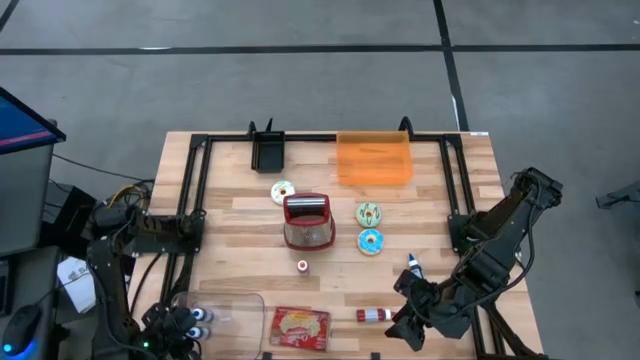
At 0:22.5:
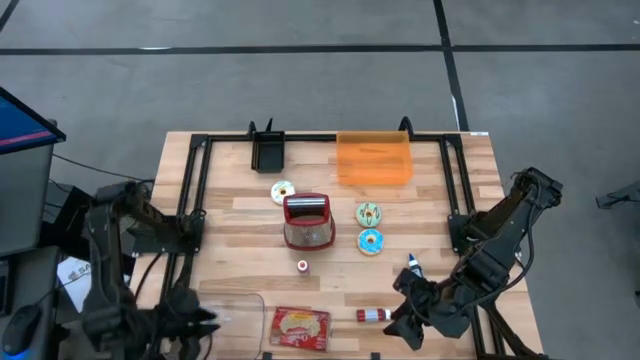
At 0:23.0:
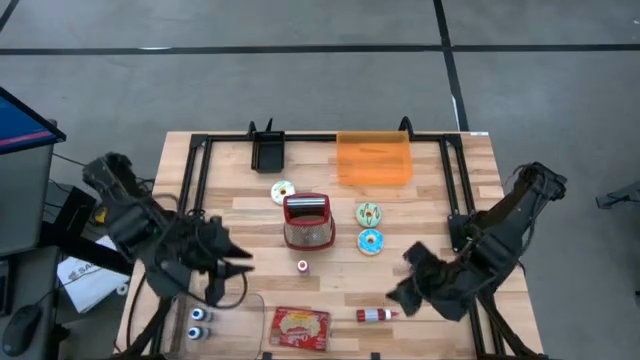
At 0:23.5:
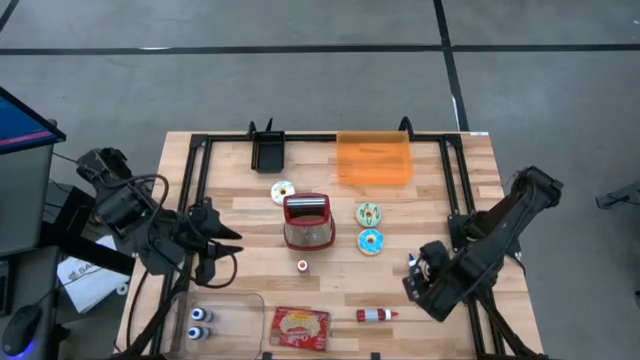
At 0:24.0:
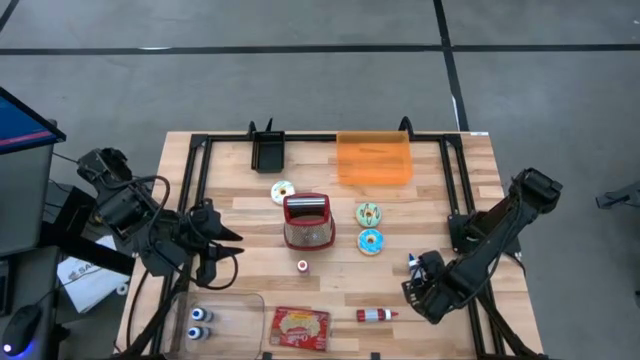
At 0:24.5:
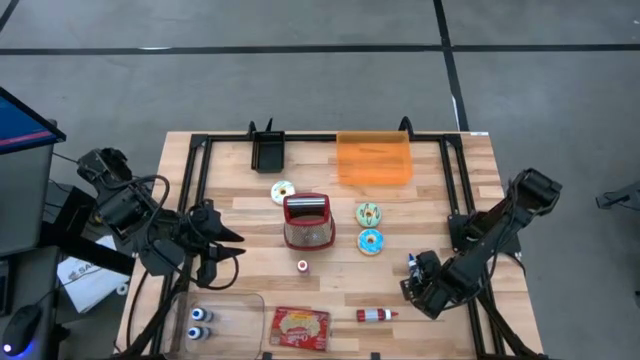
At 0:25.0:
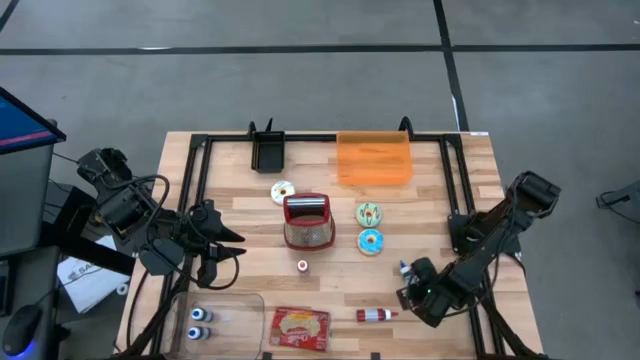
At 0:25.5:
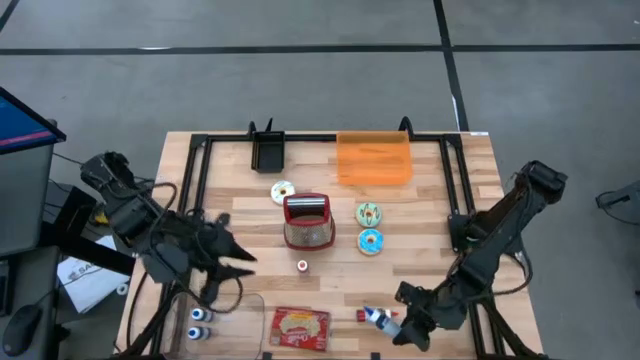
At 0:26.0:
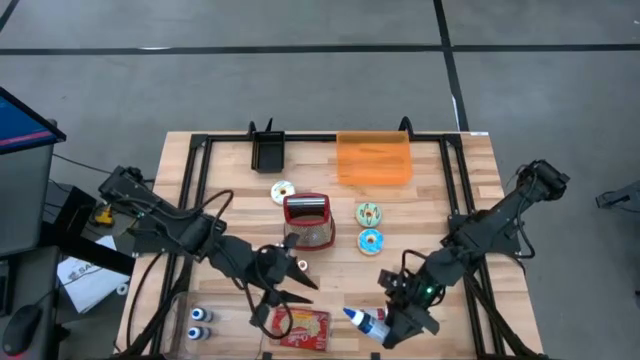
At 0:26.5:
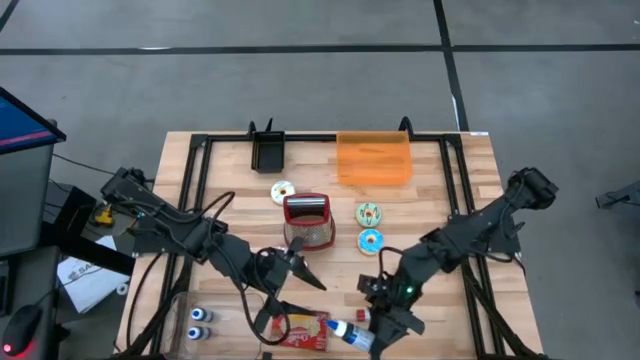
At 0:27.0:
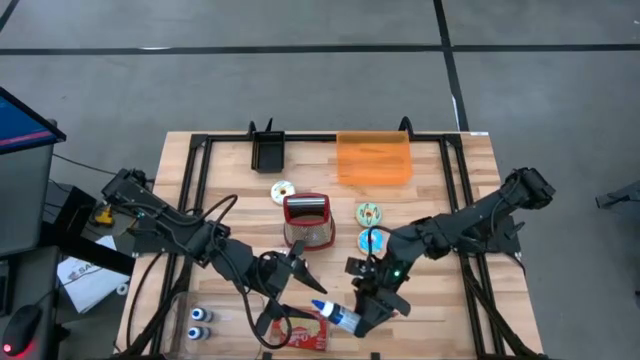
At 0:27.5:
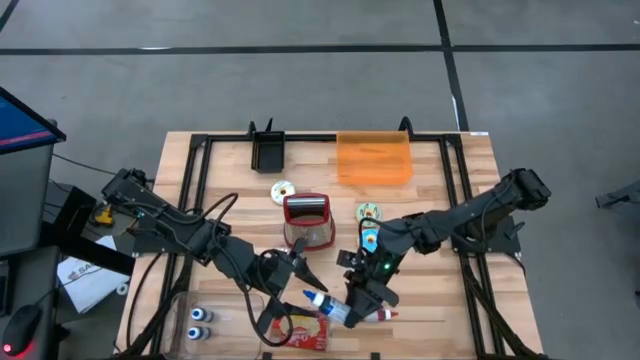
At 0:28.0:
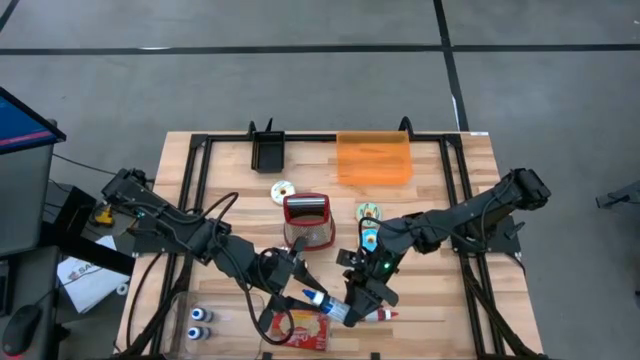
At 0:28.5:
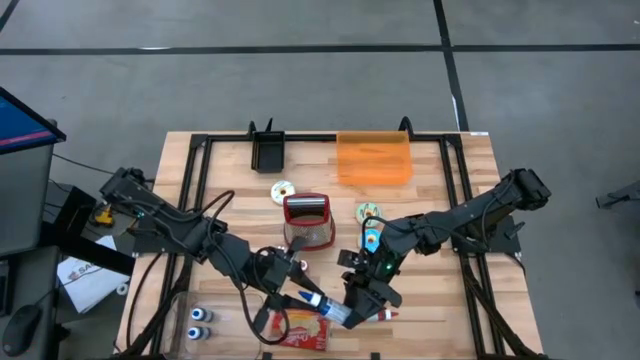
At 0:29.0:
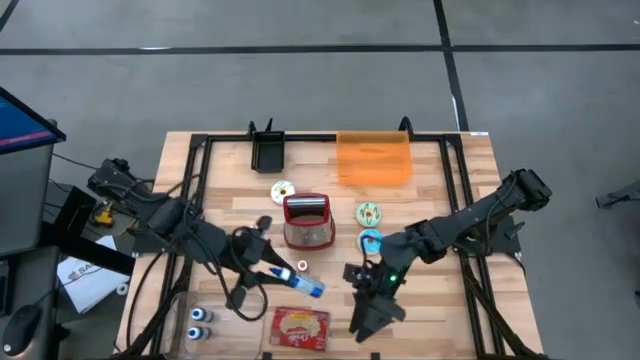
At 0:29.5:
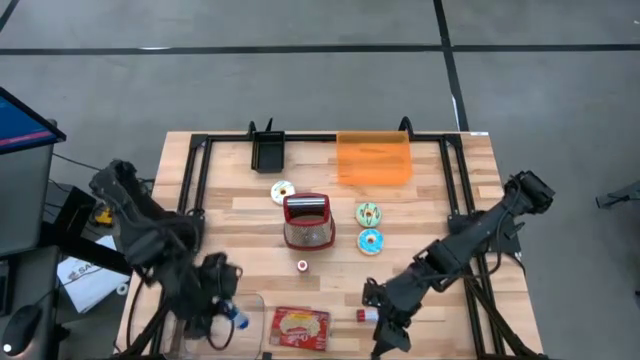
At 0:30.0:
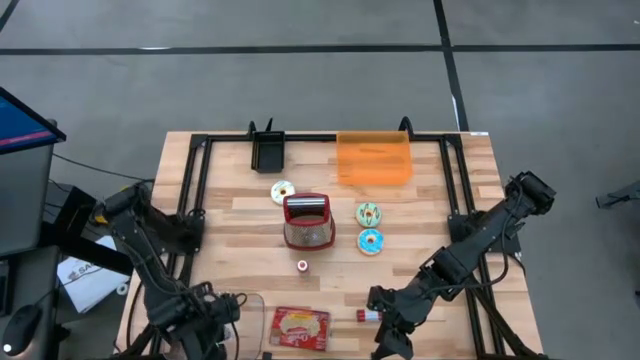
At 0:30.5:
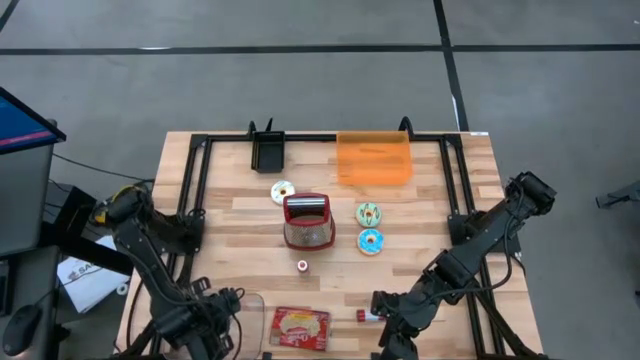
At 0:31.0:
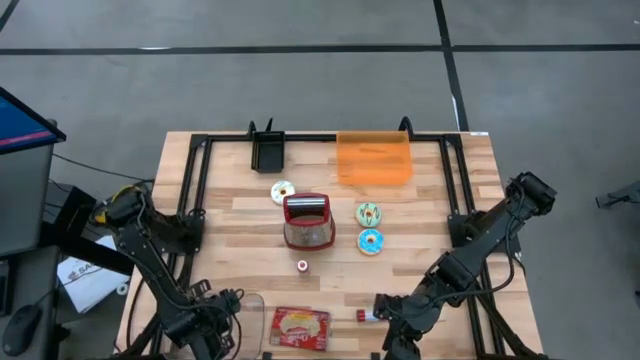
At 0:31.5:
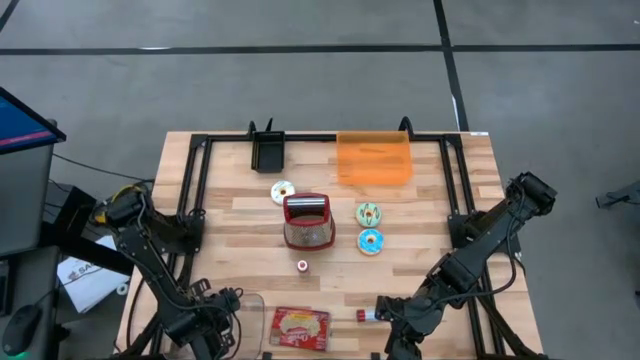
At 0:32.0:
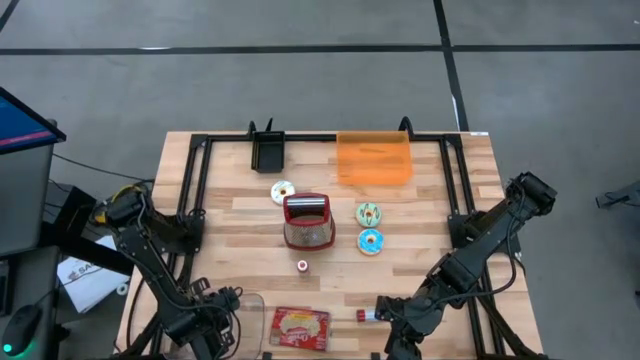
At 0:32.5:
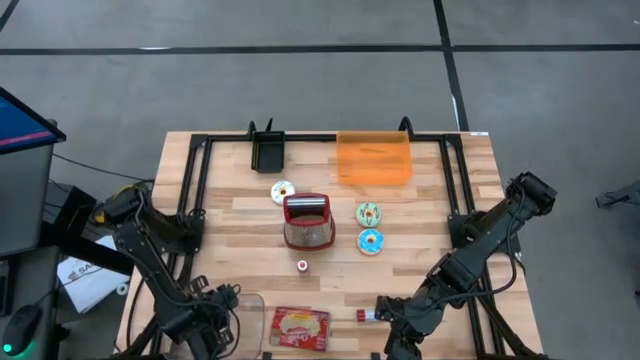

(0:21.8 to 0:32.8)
Put the blue food coloring bottle into the transparent bin

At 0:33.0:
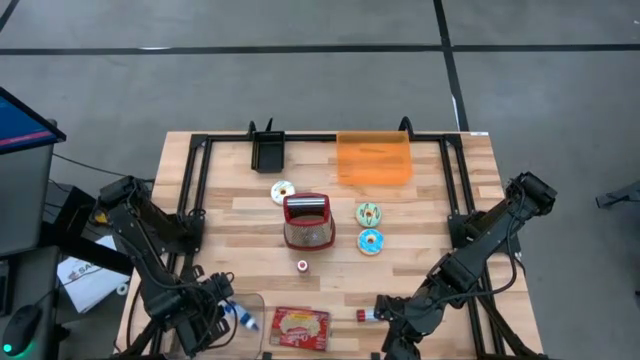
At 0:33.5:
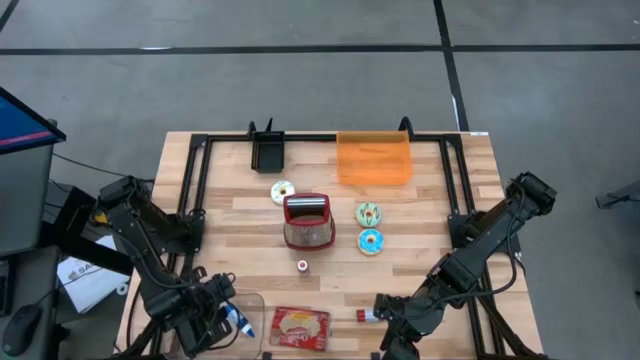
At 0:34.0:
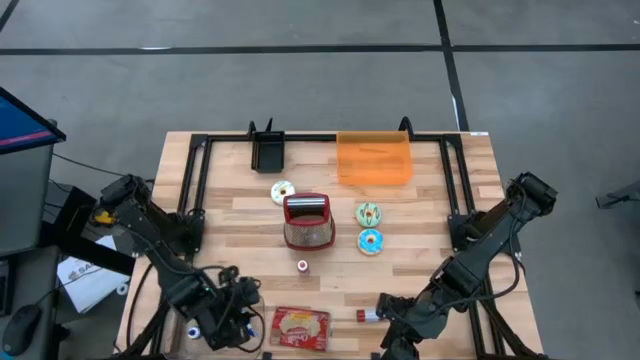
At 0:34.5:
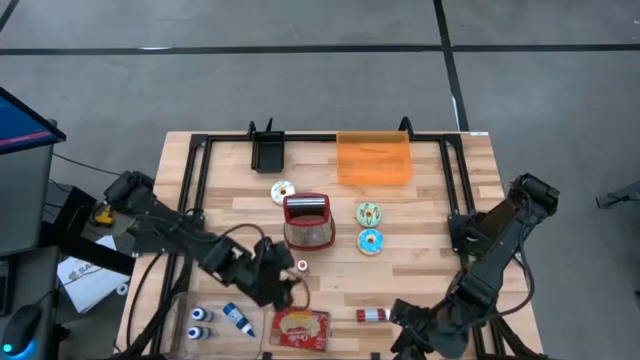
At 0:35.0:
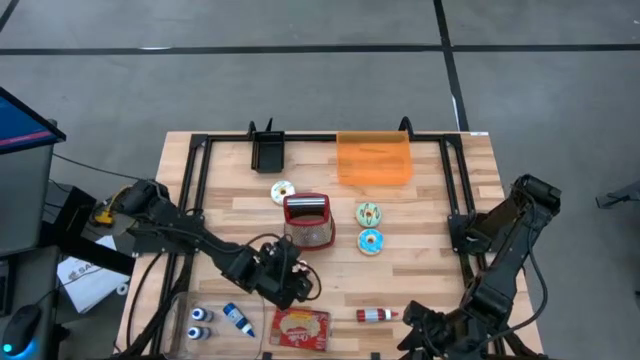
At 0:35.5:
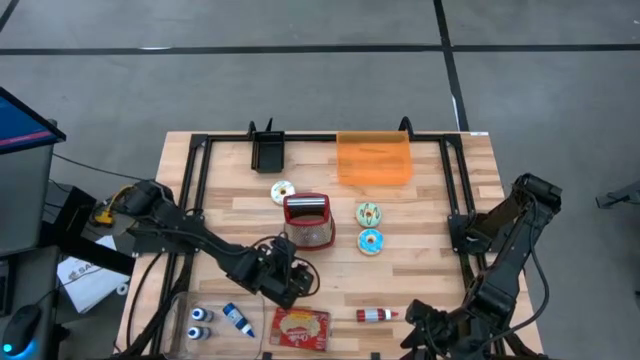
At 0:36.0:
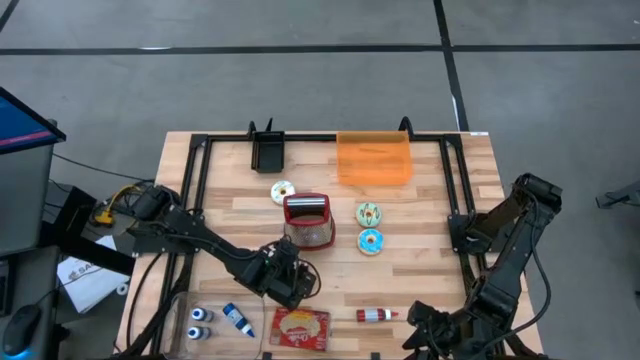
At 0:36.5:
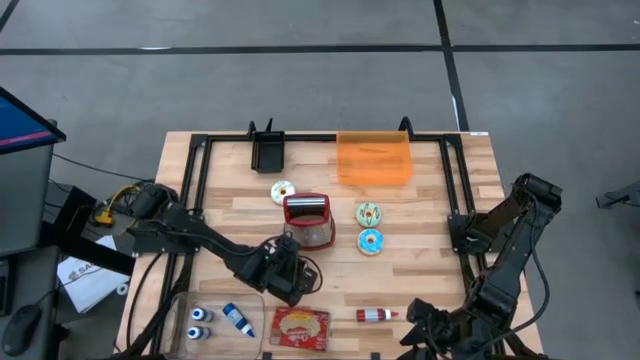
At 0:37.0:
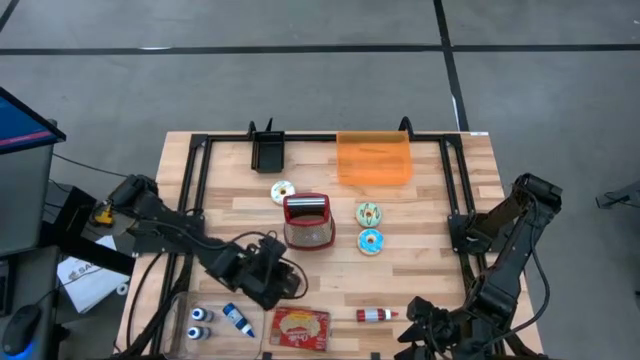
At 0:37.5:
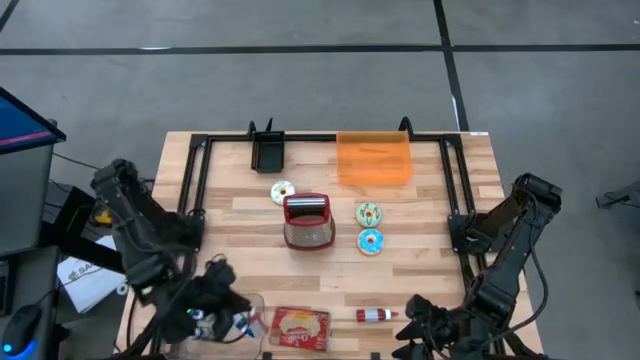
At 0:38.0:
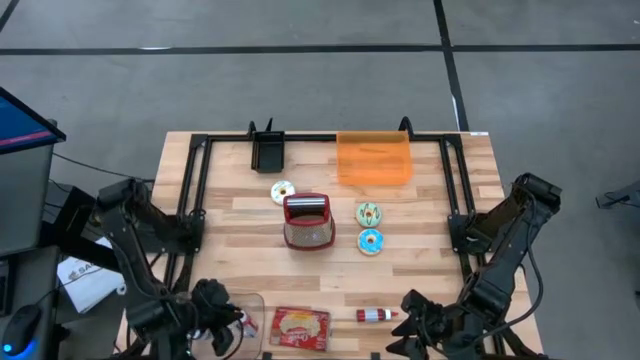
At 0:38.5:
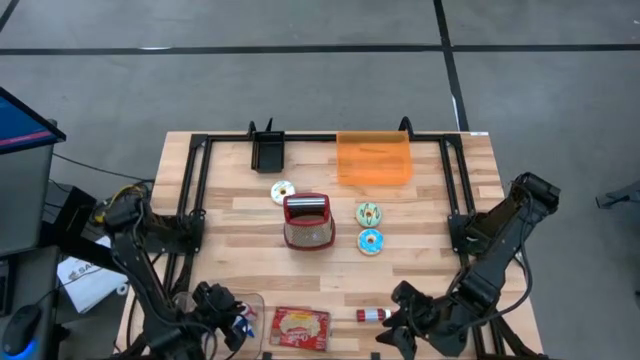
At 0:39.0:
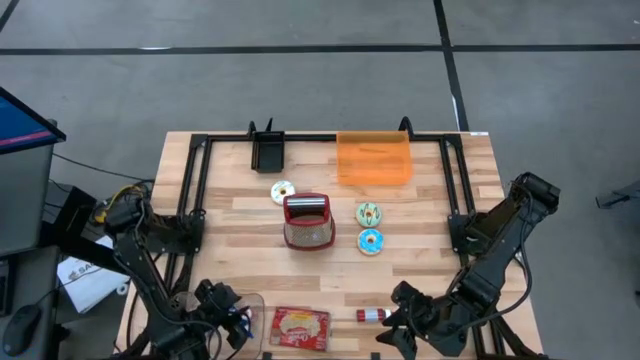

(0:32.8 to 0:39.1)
Put the orange food coloring bottle into the transparent bin

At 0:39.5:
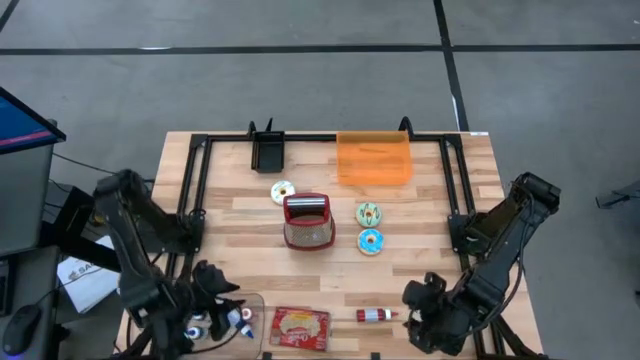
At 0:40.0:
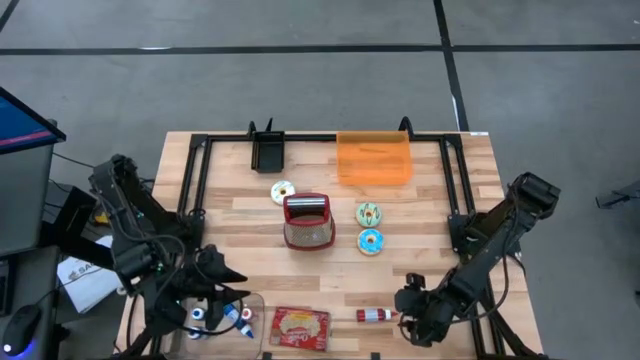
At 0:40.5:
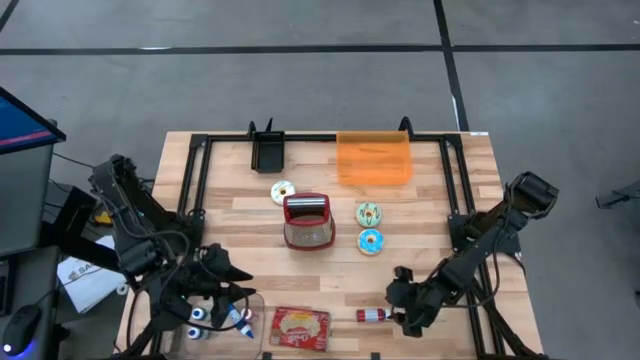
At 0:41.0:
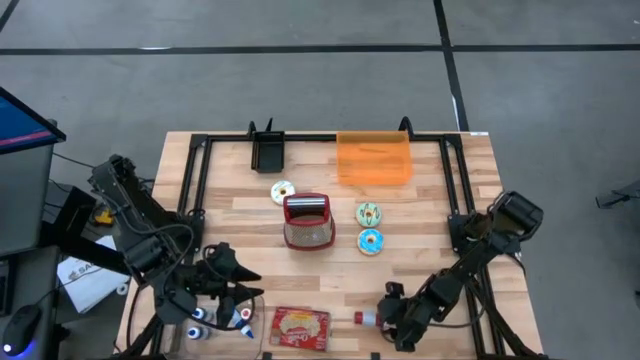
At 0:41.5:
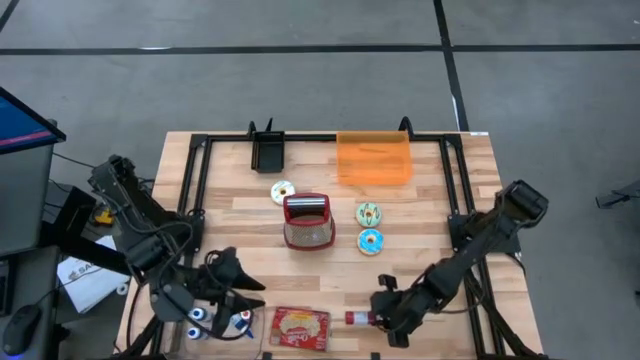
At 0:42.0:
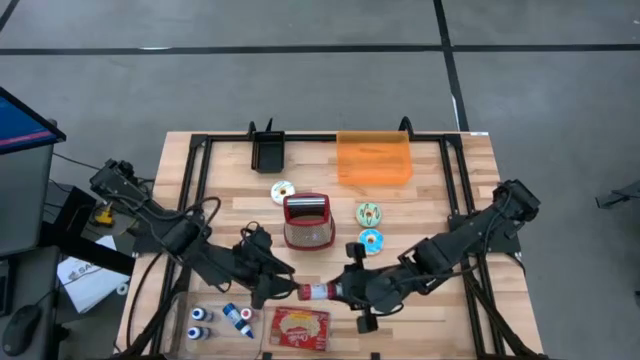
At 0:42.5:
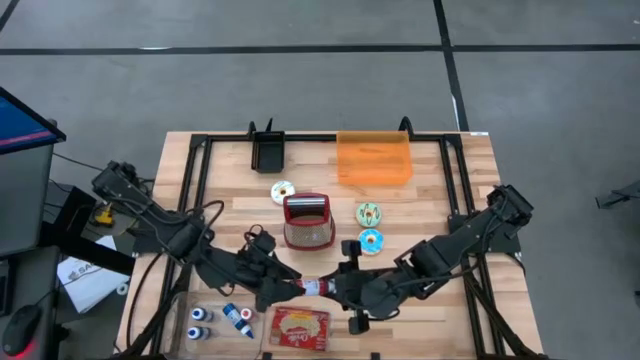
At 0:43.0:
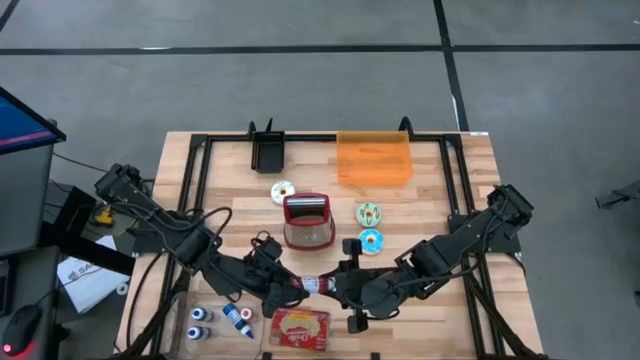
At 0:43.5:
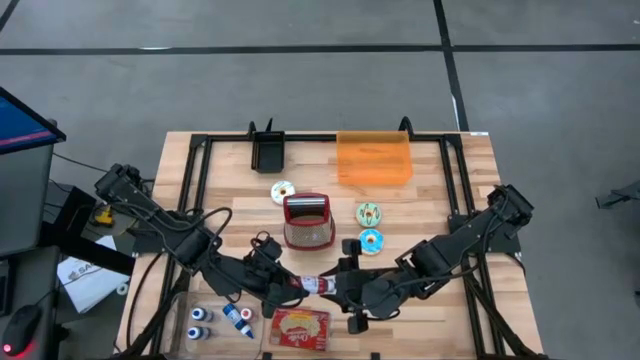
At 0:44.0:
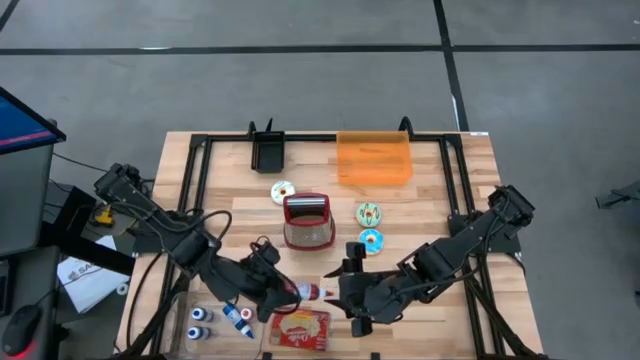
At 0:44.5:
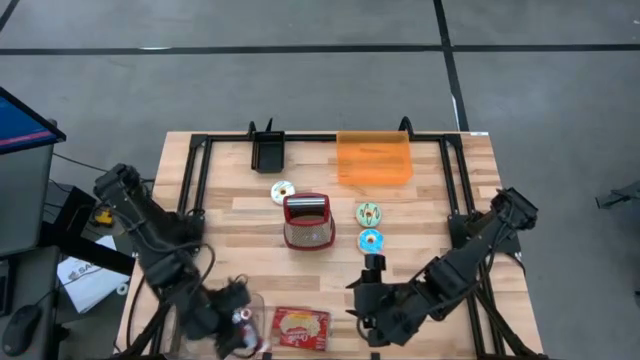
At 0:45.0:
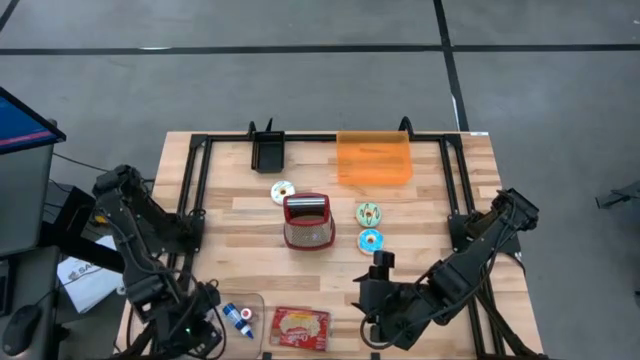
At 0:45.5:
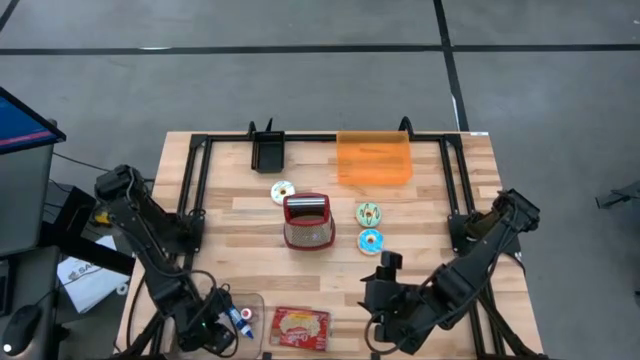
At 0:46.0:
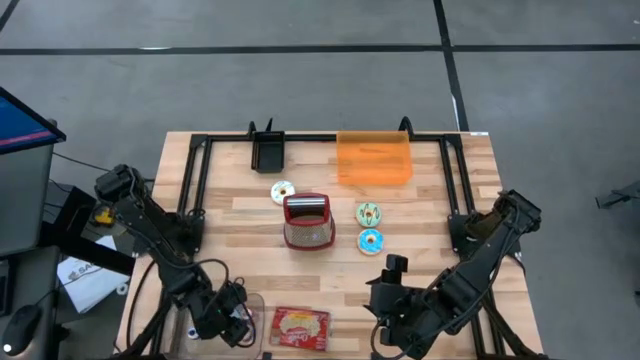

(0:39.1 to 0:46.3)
Put the red food coloring bottle into the transparent bin
